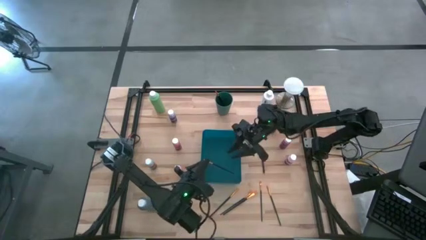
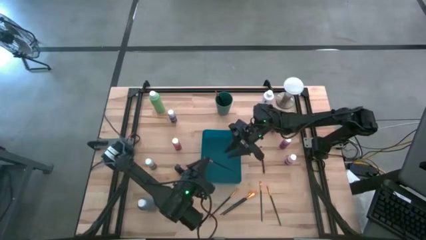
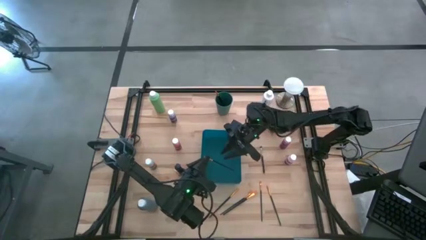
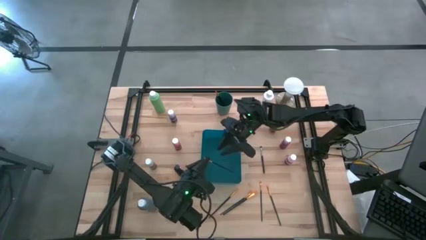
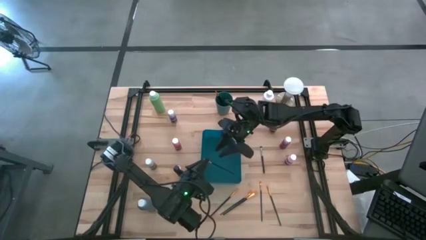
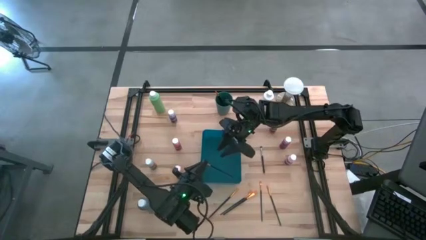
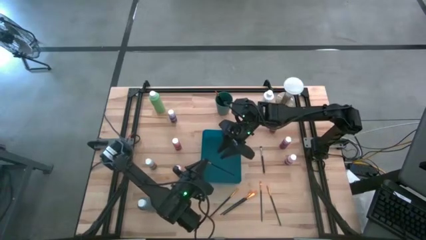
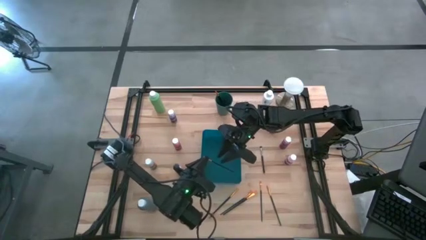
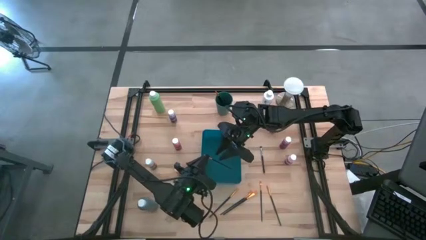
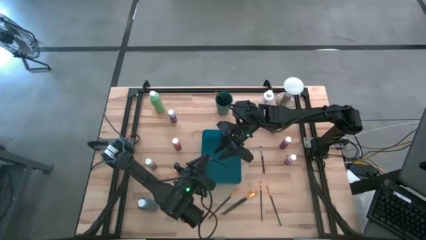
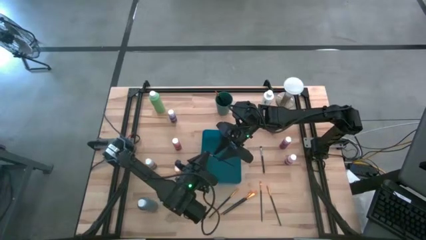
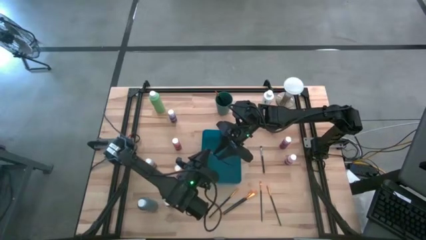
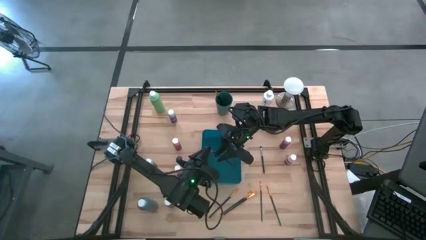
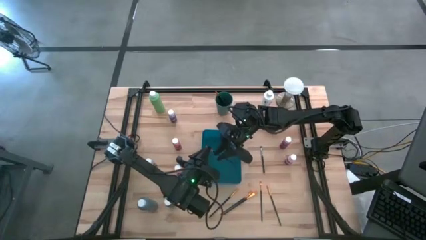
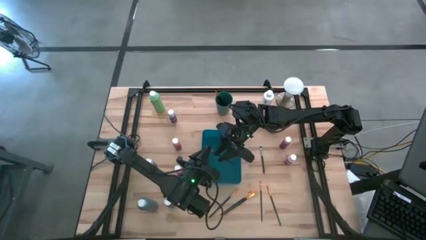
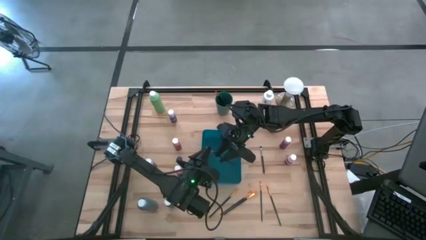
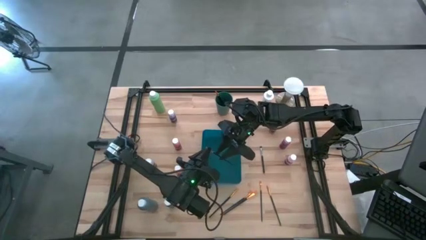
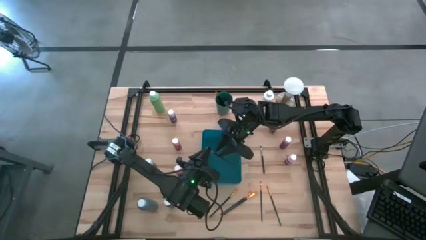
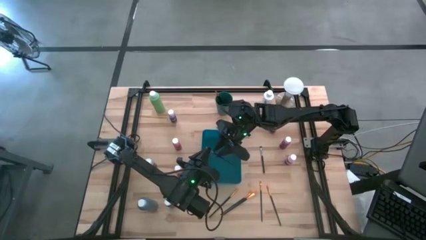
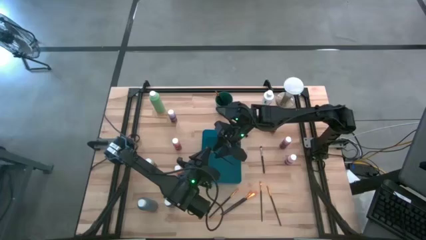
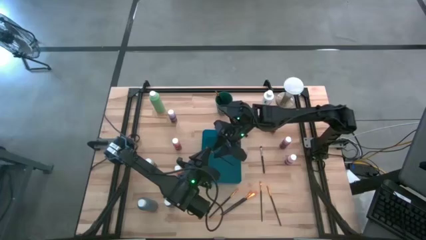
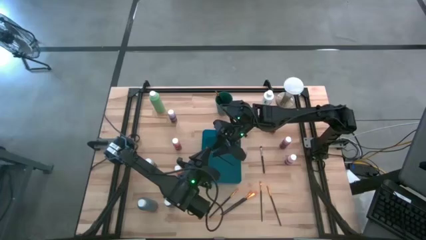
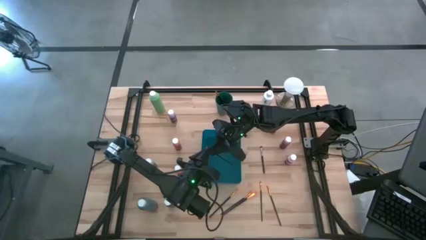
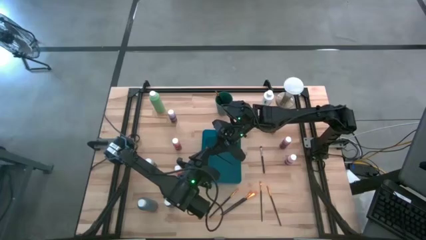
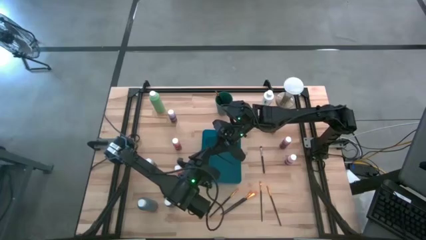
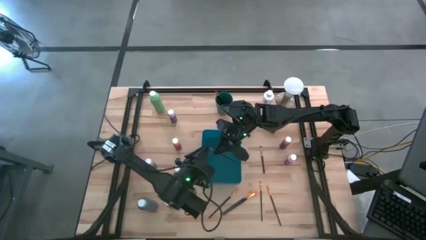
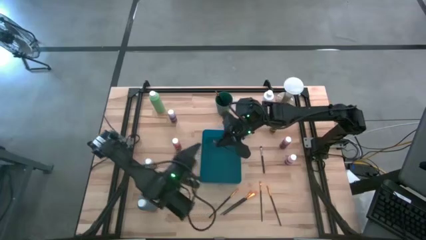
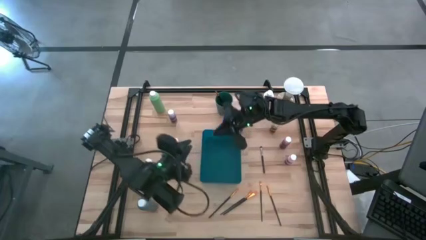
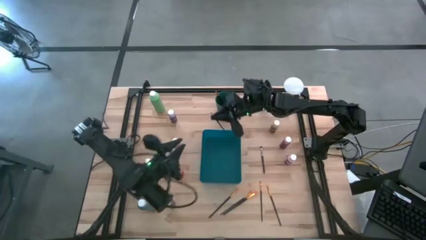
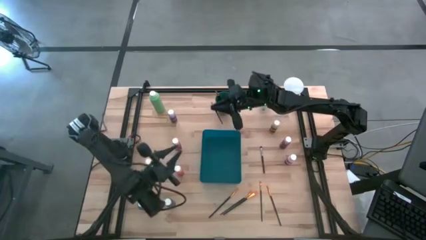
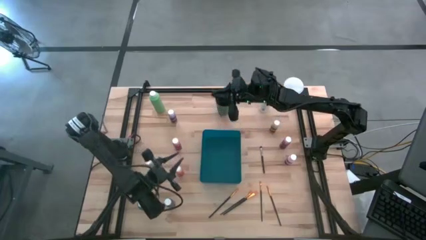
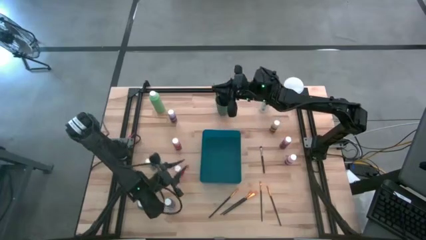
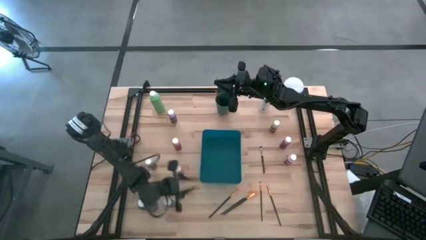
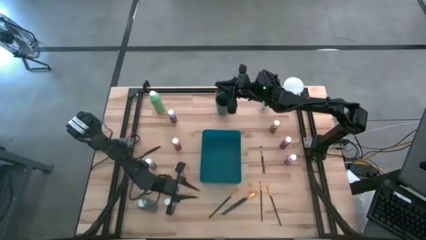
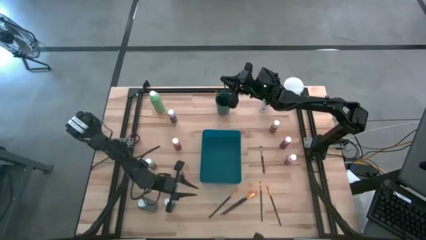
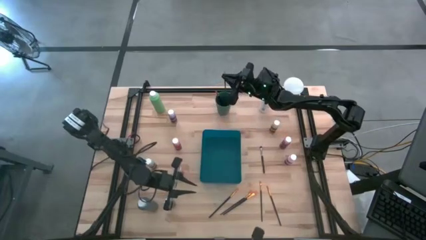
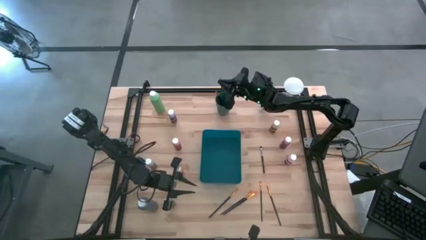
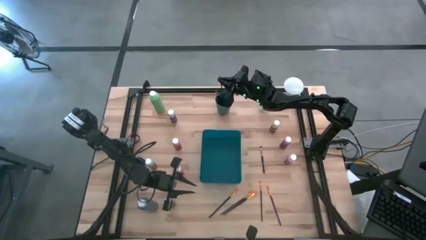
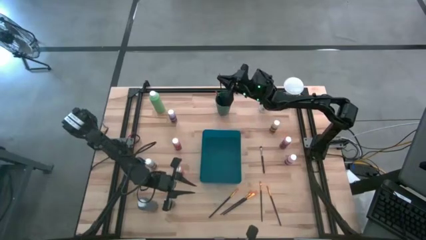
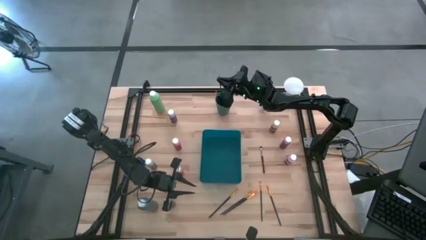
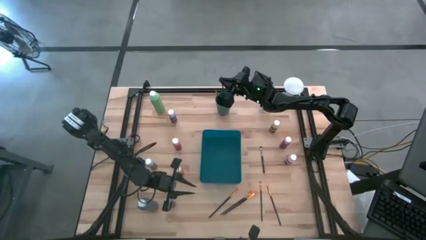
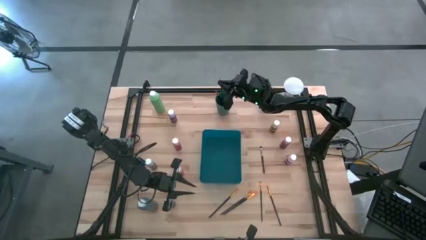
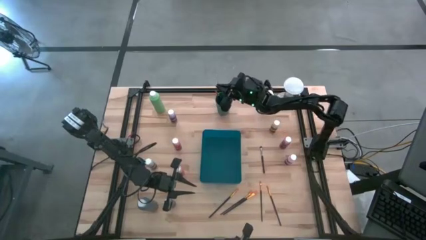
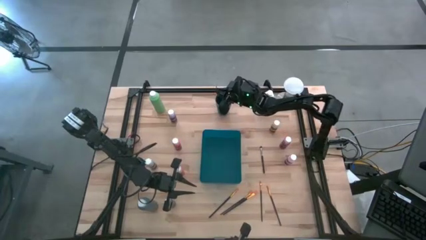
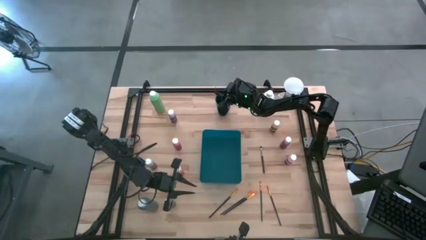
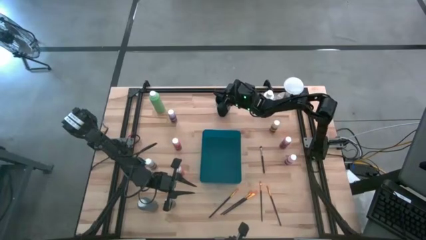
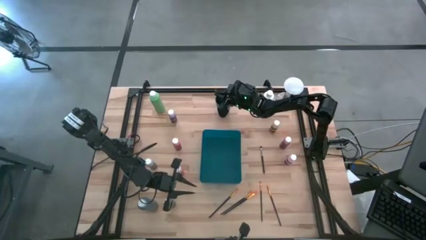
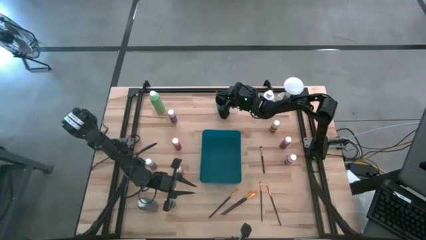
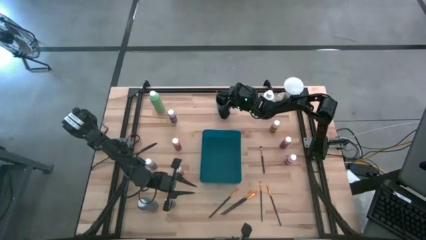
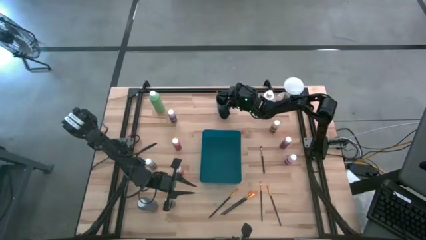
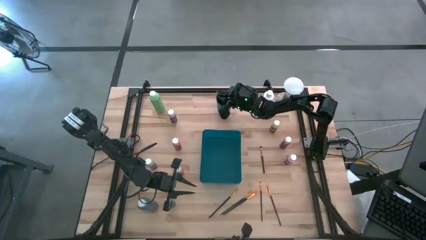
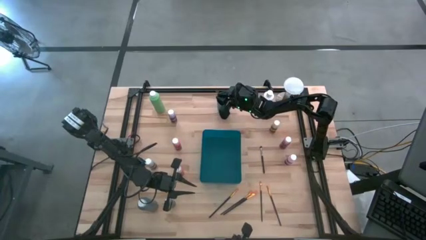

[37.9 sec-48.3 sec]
Task: Pick & Place Paint Supplies
Put the gold paint brush into the green cup

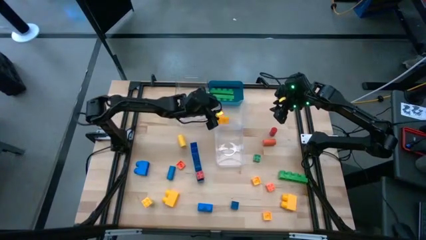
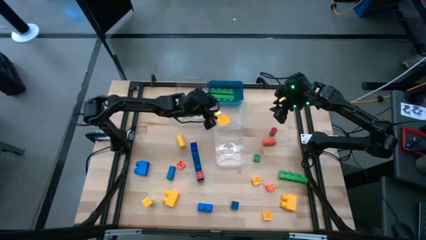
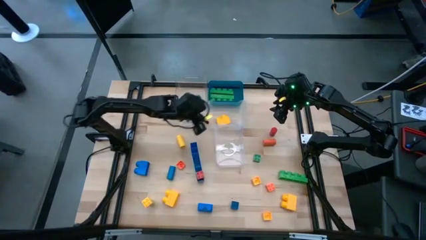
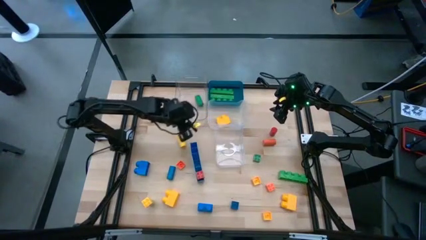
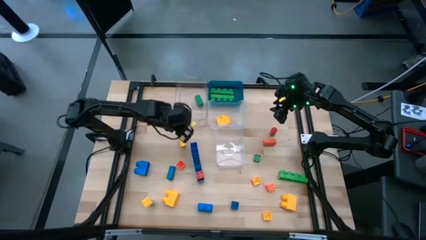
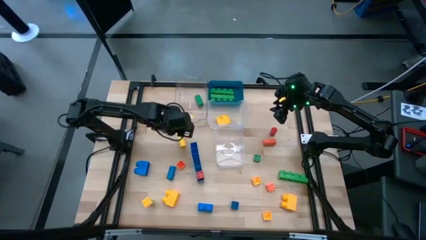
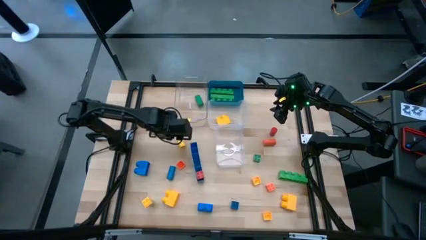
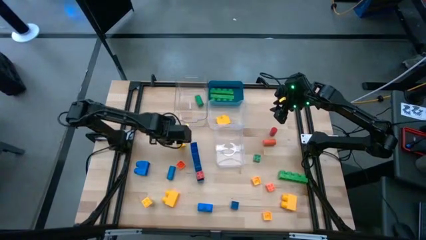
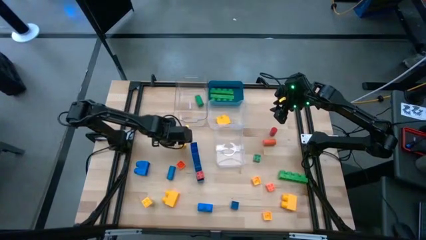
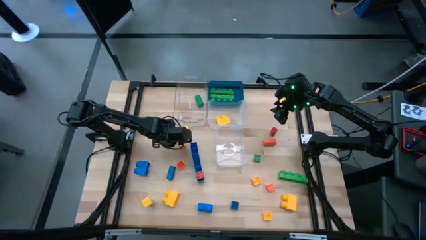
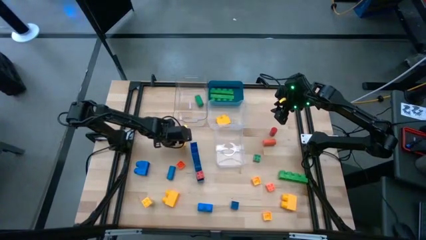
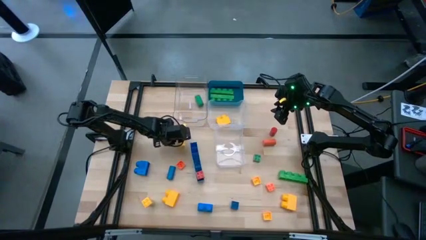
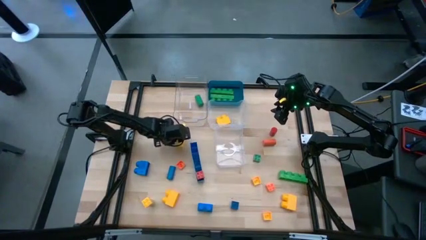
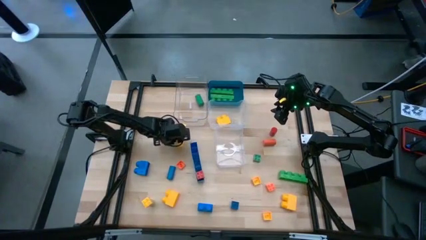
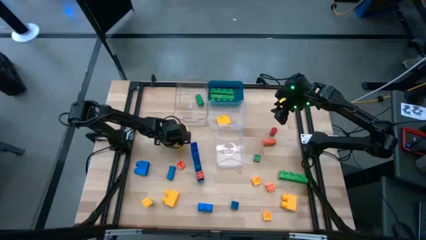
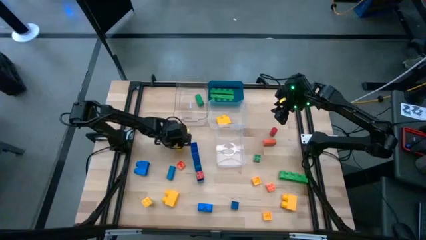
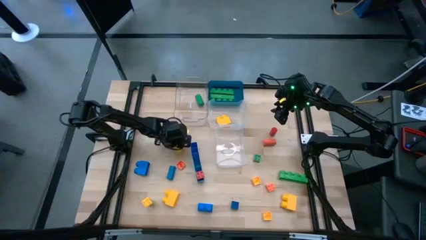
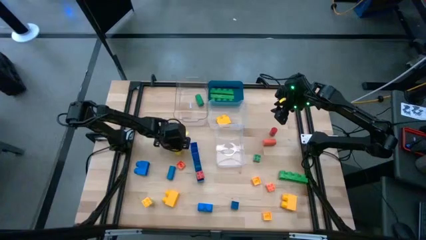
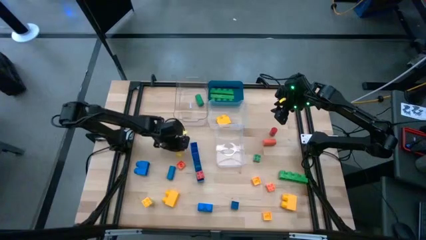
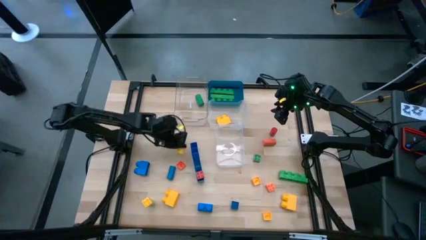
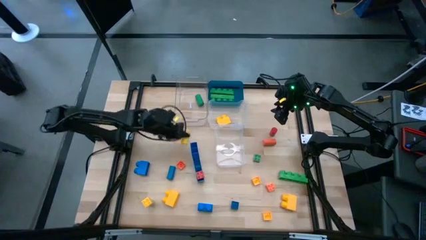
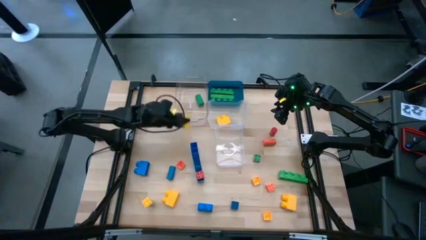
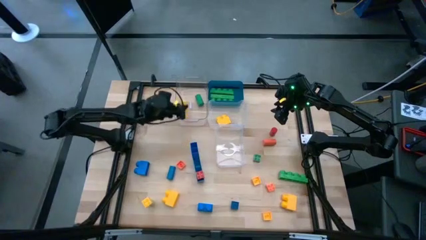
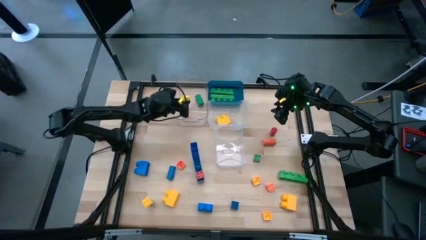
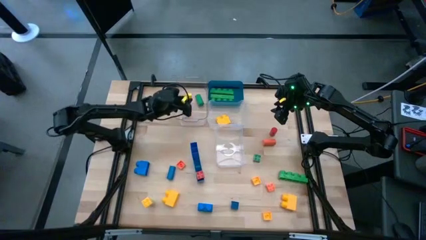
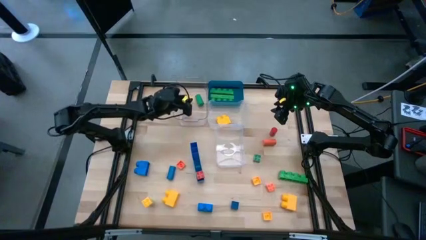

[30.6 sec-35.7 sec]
Task: Sort blocks by size
Put the yellow cylindrical block into the top left transparent bin
